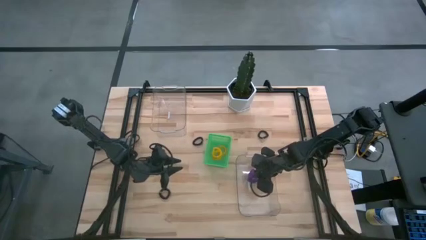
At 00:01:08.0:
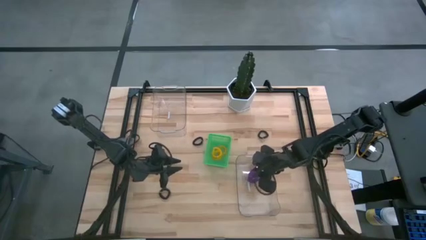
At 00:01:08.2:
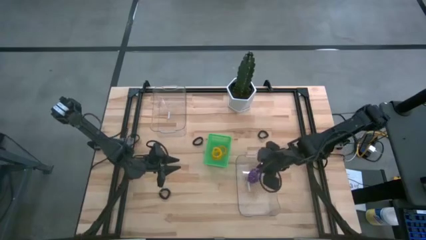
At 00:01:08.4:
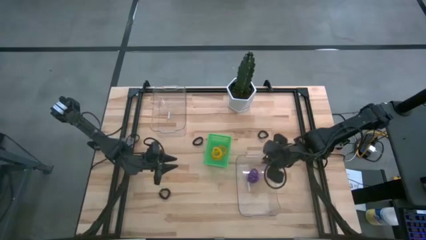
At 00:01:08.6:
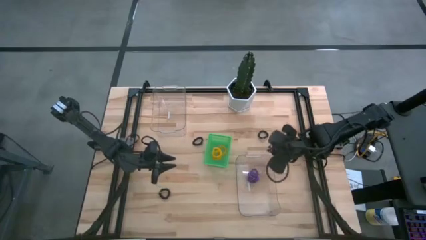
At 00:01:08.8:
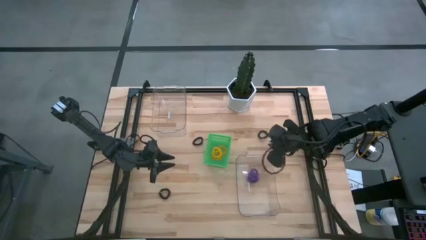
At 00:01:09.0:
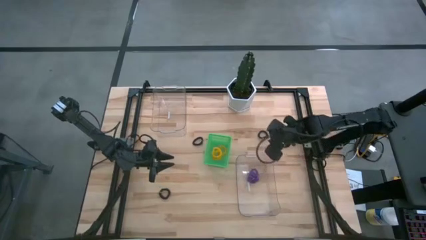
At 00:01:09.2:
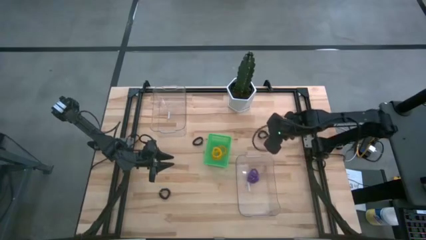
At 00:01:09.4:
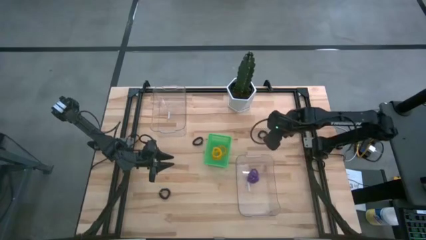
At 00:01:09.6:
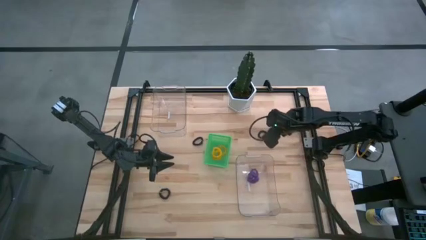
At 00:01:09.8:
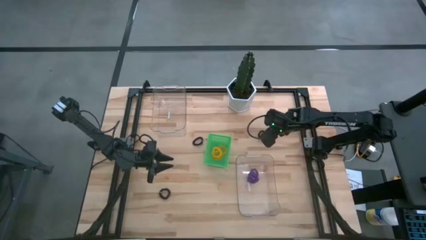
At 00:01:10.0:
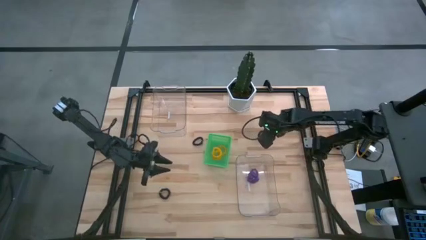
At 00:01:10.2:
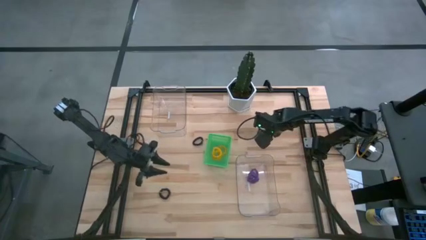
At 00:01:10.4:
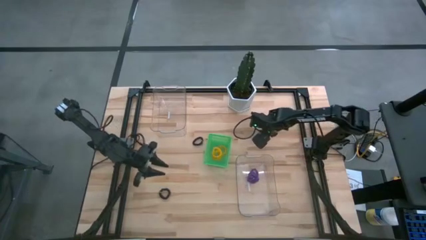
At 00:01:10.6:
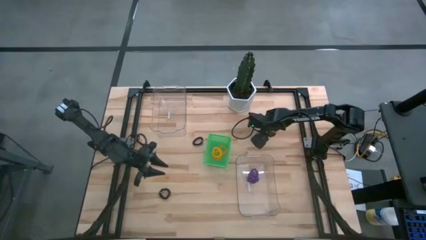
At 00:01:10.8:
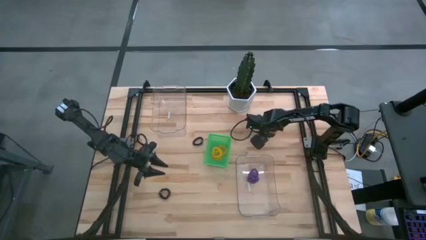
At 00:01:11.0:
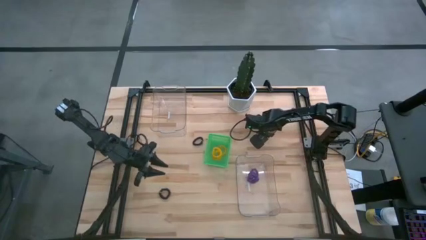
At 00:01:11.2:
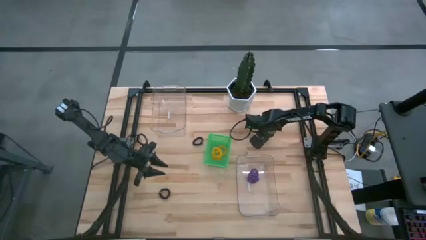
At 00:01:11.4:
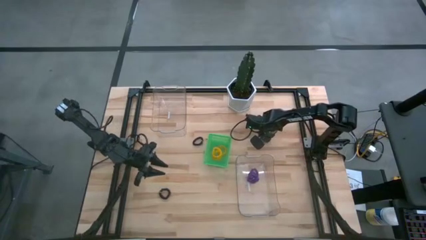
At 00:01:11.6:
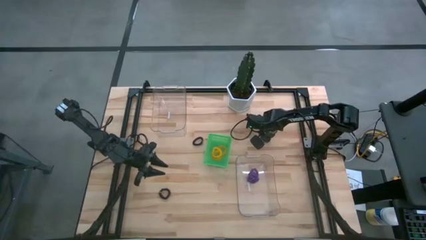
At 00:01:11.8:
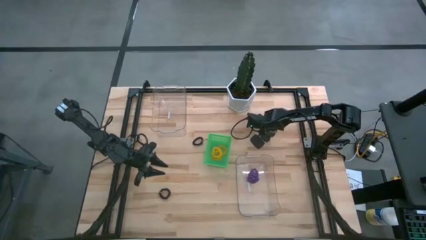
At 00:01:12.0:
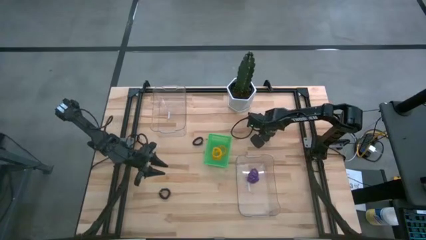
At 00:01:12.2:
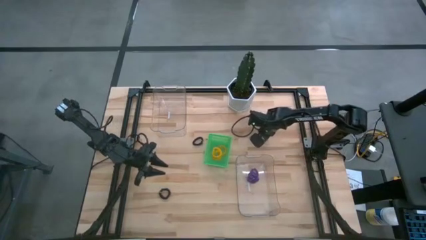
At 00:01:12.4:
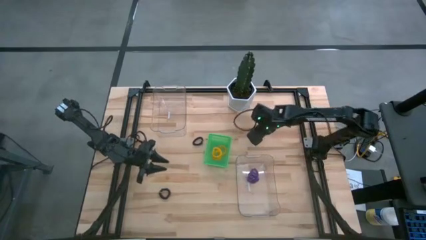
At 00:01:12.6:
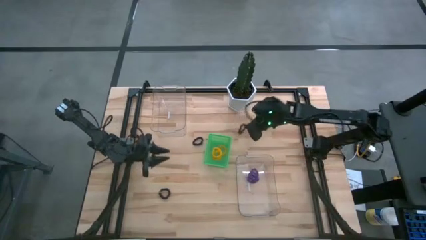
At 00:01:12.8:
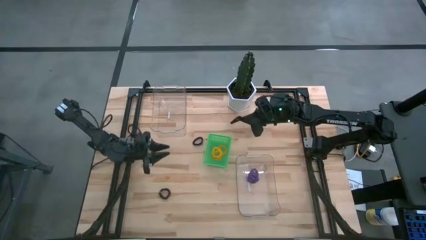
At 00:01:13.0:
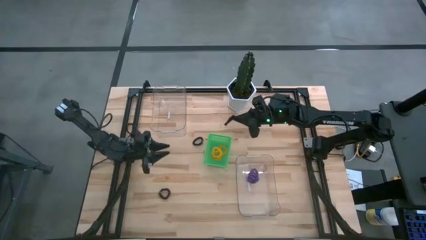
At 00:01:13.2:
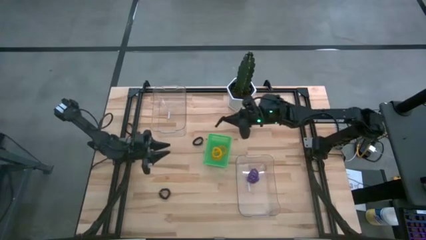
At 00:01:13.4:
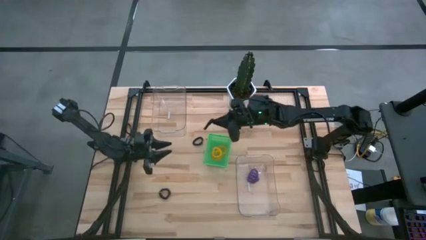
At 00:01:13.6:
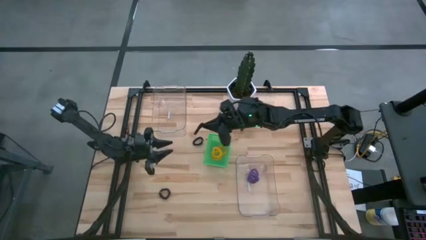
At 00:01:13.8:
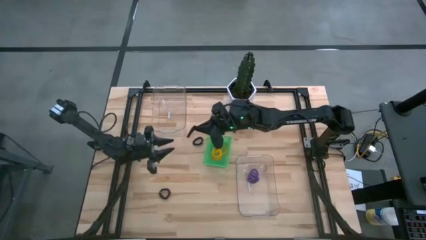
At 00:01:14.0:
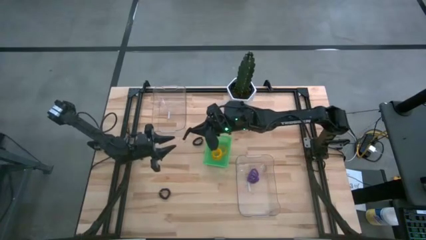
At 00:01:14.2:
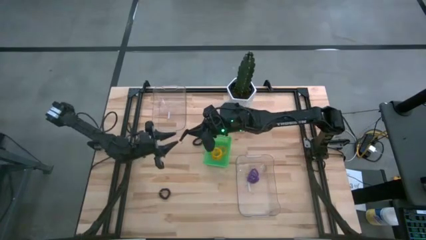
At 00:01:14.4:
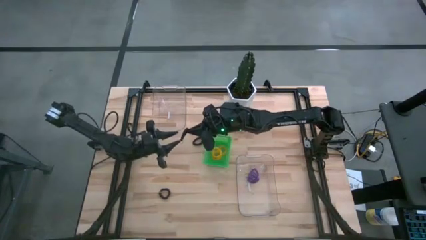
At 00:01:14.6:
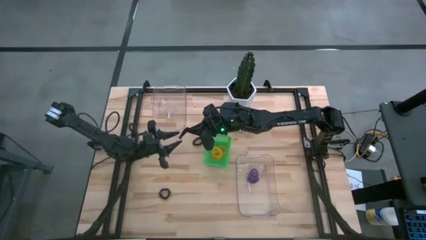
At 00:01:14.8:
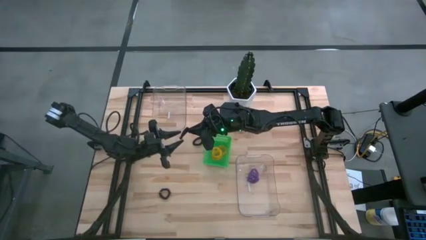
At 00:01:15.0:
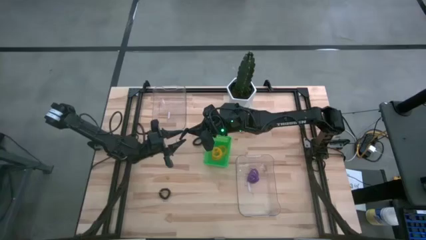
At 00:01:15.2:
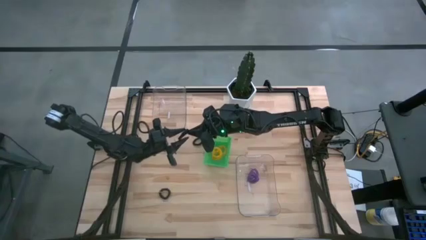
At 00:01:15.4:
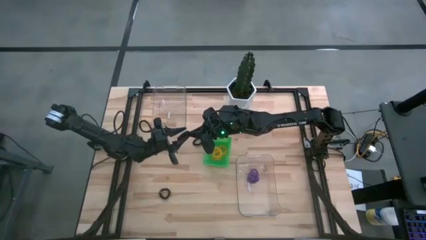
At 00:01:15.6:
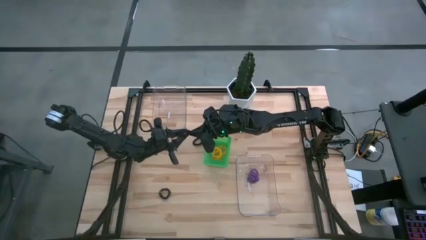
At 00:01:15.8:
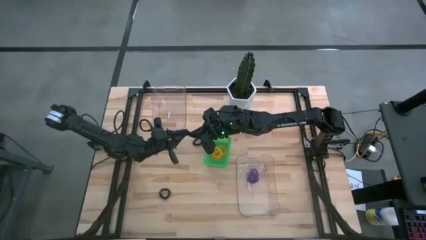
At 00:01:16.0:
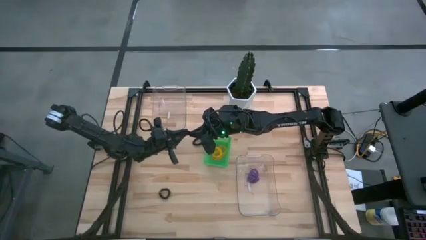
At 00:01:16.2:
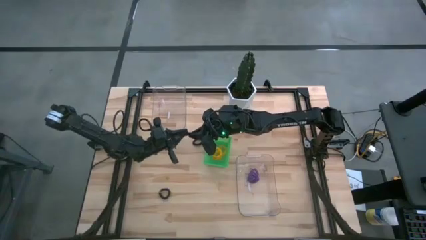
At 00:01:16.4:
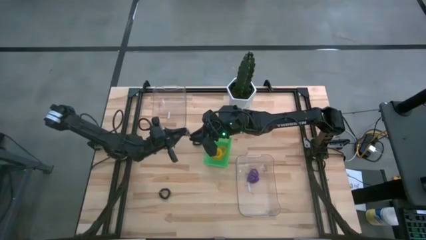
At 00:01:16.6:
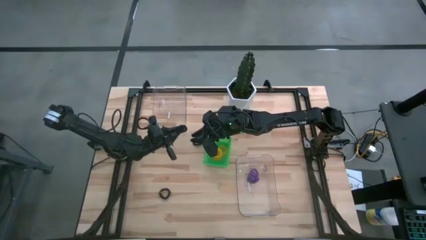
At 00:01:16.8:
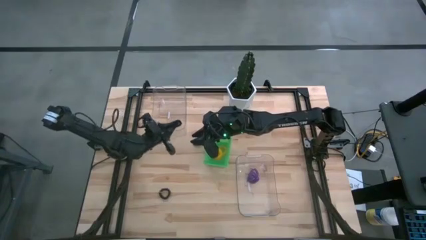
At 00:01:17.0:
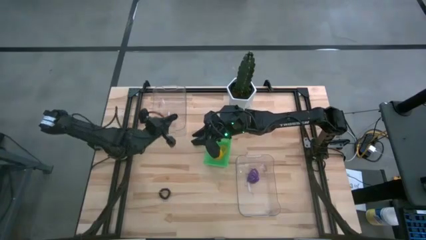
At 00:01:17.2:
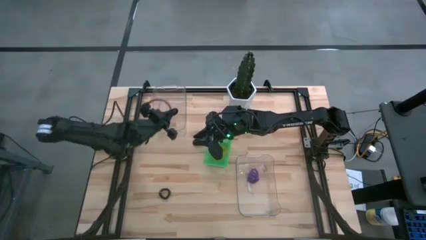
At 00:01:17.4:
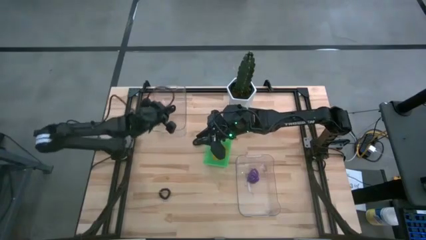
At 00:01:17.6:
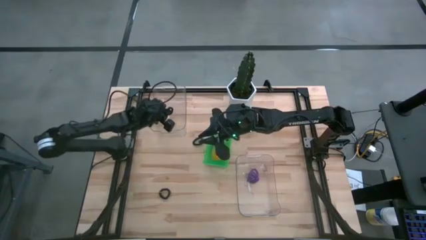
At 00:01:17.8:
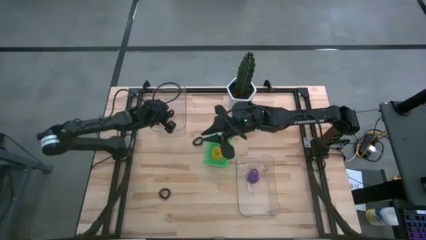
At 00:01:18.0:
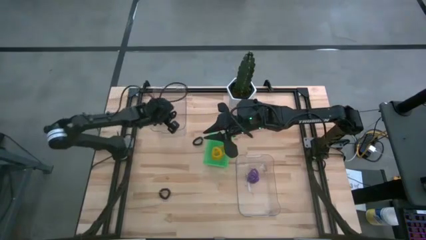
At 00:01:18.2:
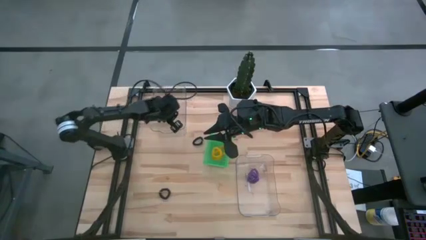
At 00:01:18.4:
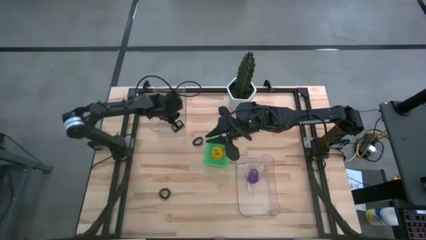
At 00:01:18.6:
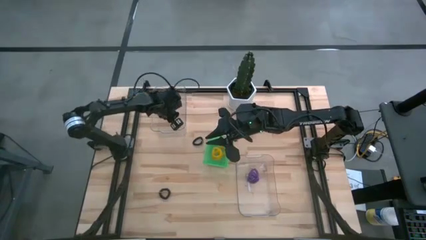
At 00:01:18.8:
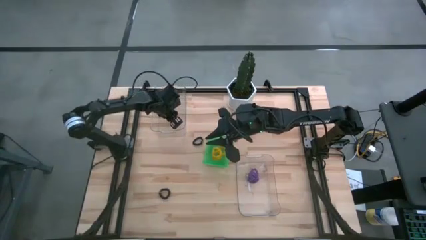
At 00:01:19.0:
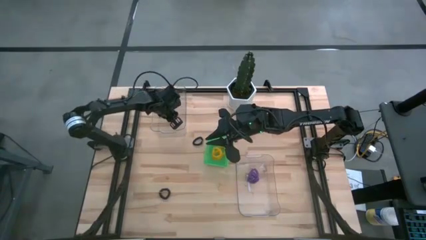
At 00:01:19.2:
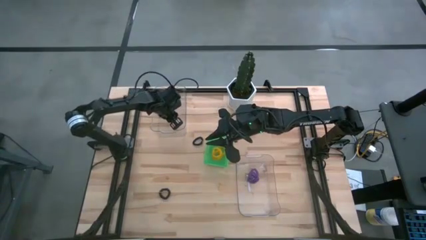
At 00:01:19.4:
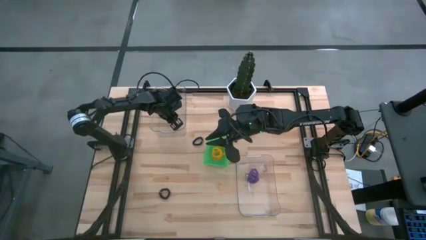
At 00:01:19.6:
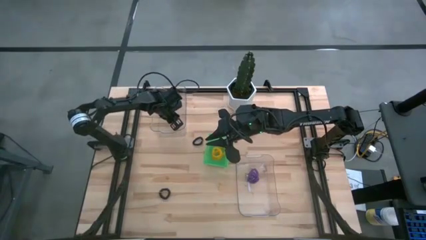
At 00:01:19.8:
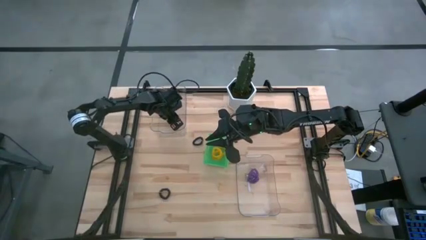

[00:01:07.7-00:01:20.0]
Task: Sort spring keychains
Put the top right black spring keychain into the left transparent bin
